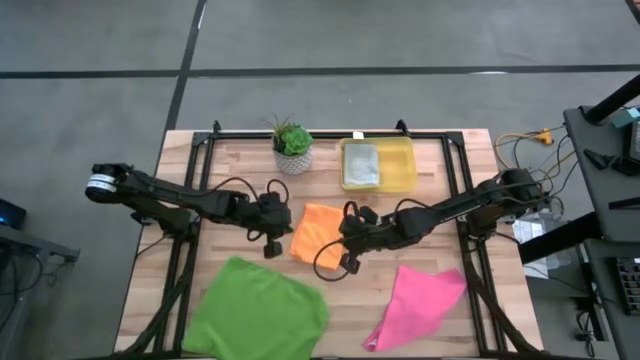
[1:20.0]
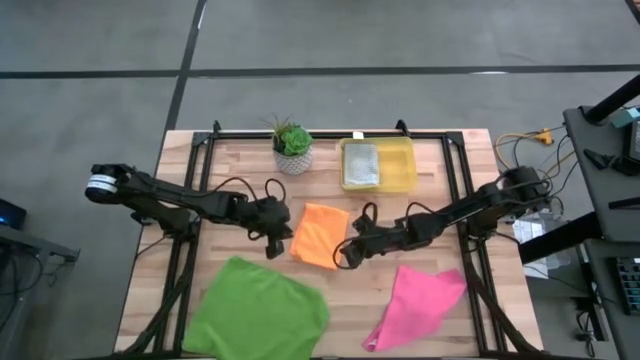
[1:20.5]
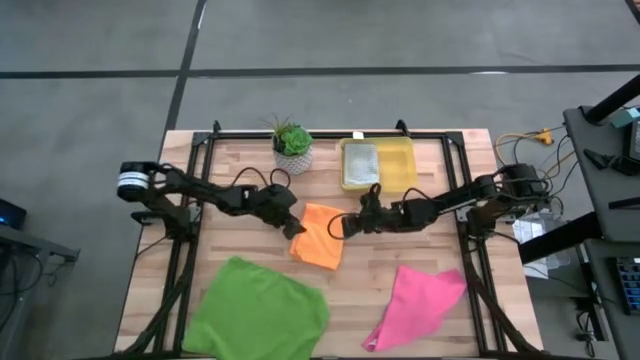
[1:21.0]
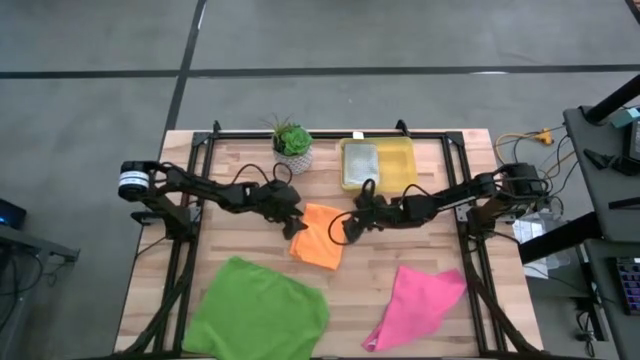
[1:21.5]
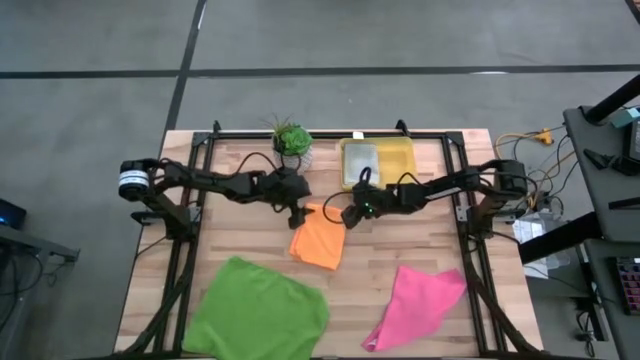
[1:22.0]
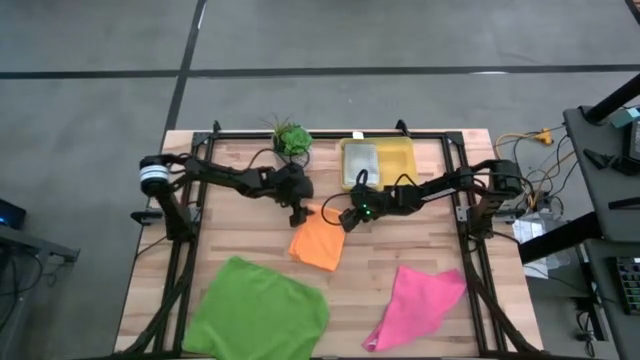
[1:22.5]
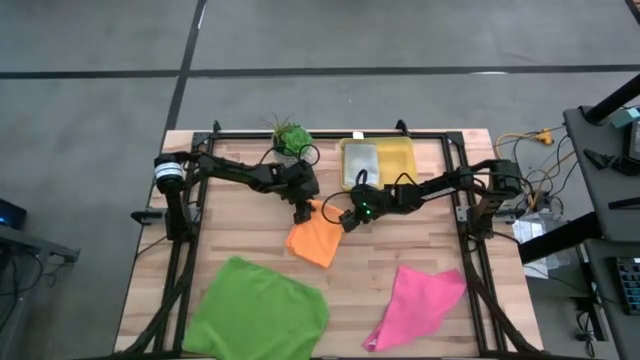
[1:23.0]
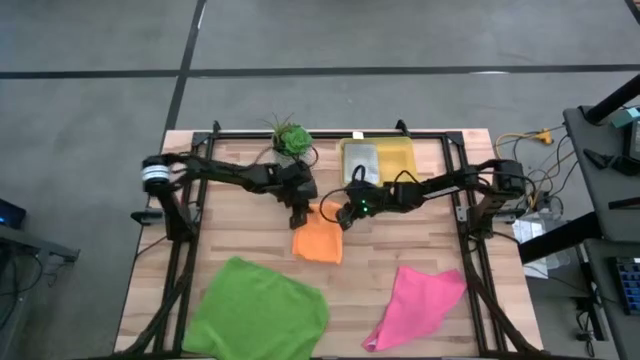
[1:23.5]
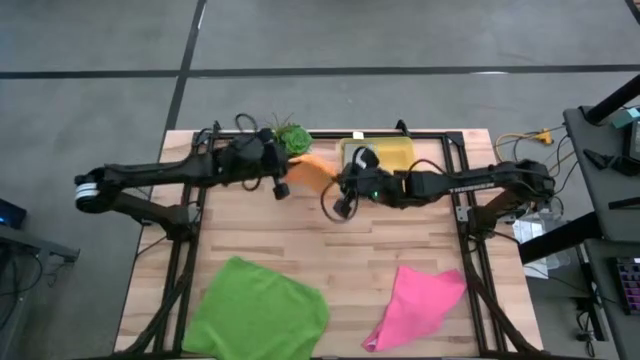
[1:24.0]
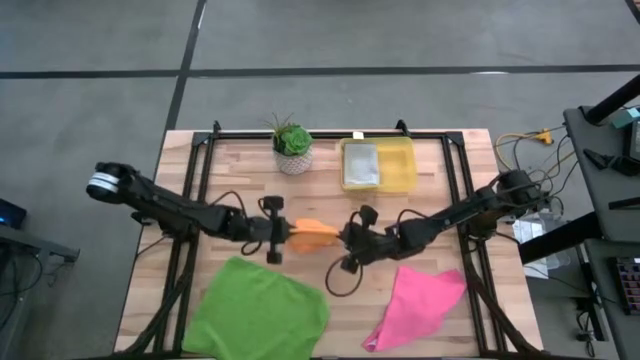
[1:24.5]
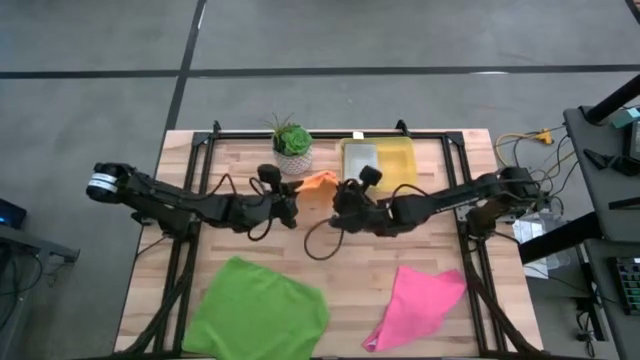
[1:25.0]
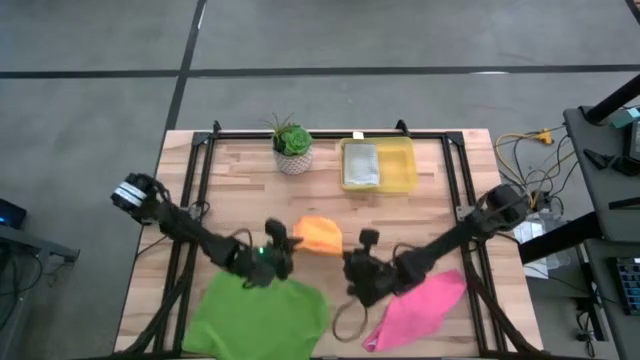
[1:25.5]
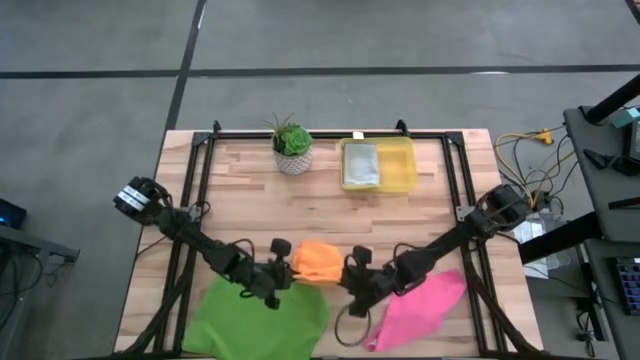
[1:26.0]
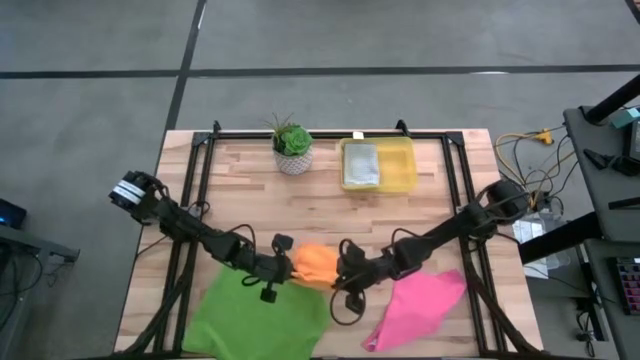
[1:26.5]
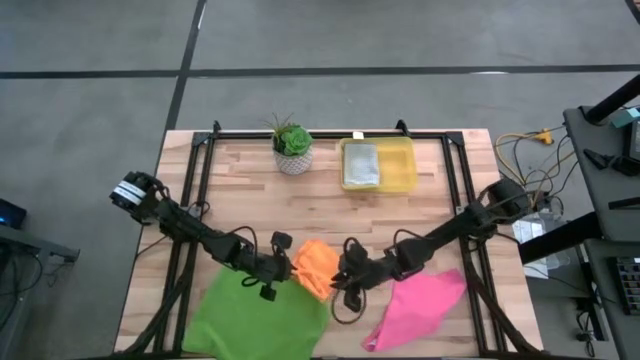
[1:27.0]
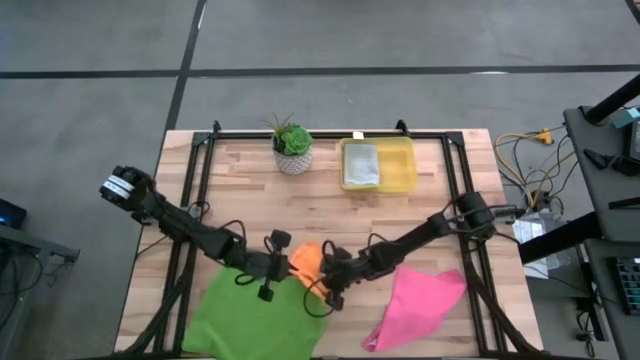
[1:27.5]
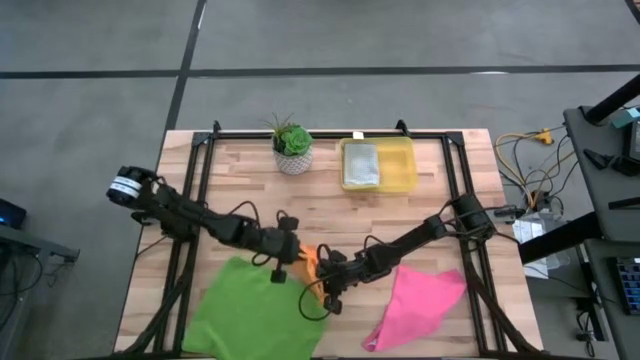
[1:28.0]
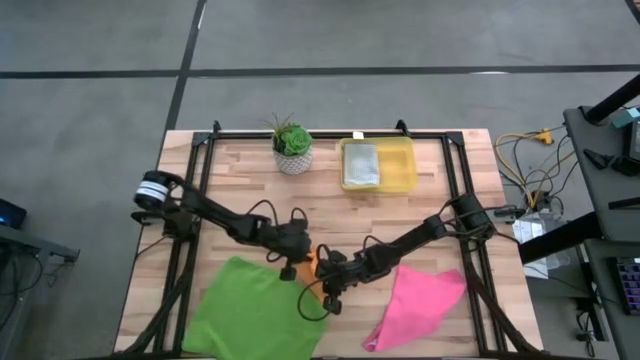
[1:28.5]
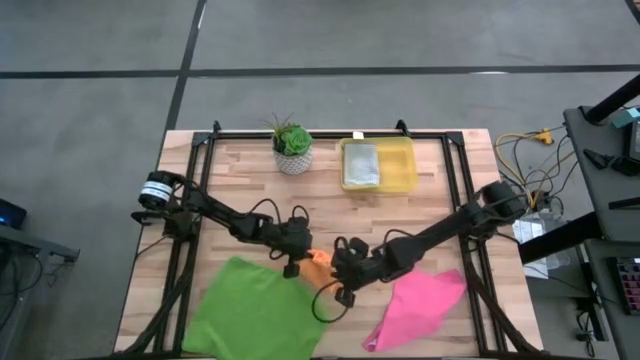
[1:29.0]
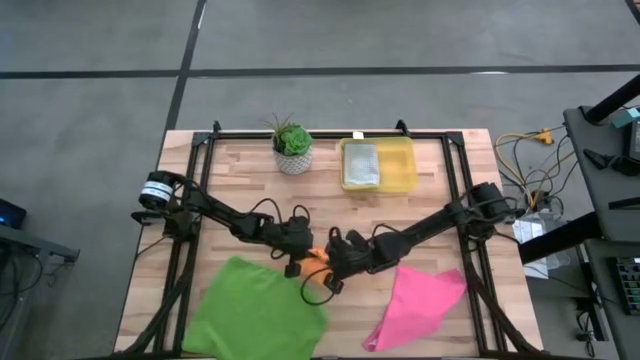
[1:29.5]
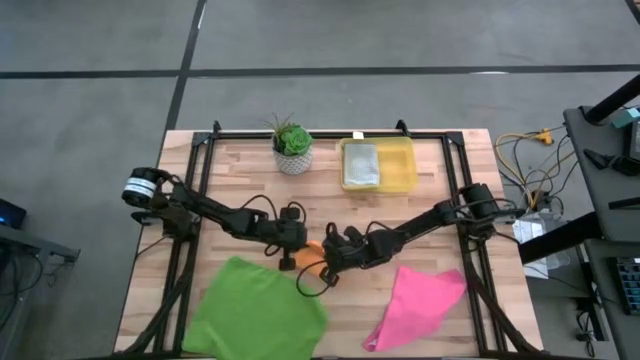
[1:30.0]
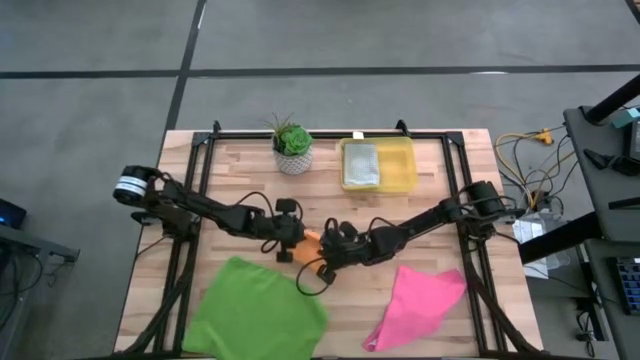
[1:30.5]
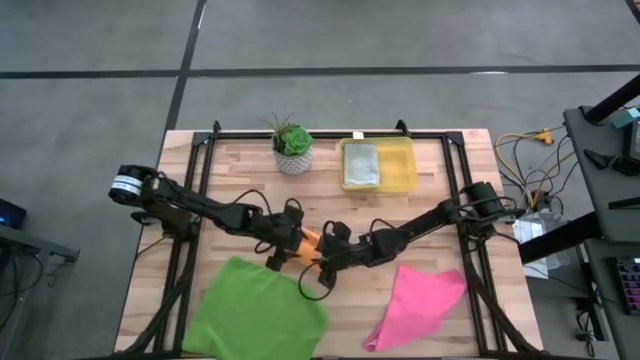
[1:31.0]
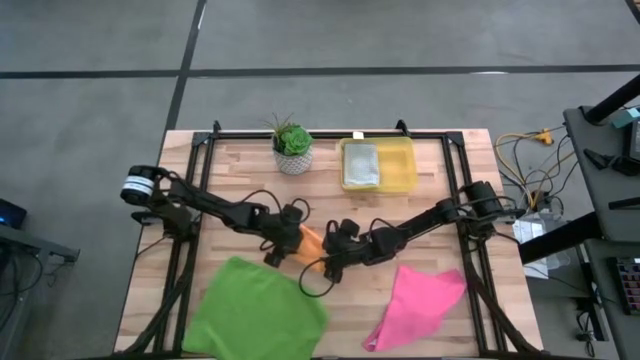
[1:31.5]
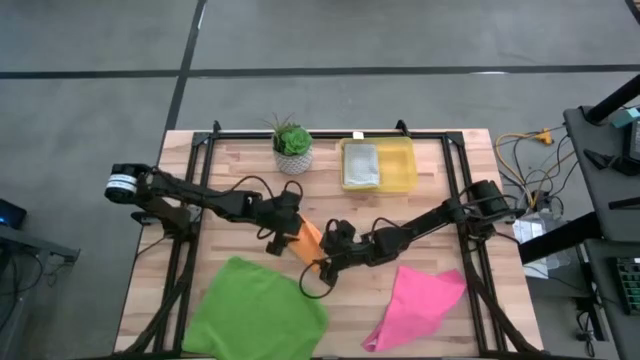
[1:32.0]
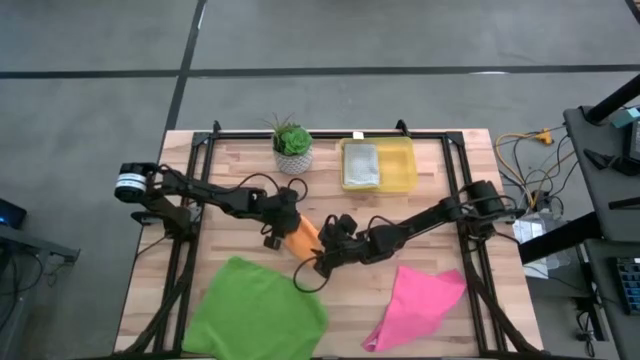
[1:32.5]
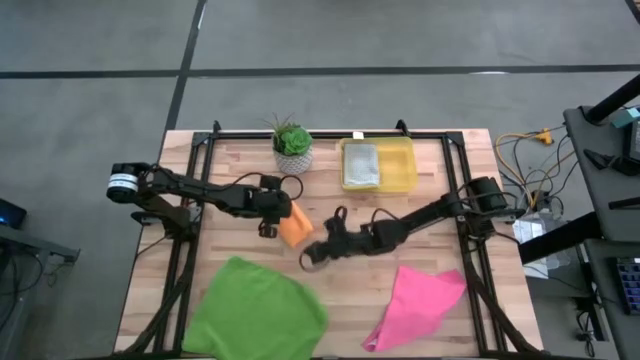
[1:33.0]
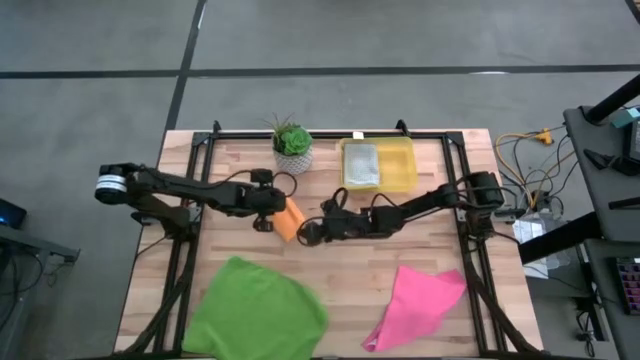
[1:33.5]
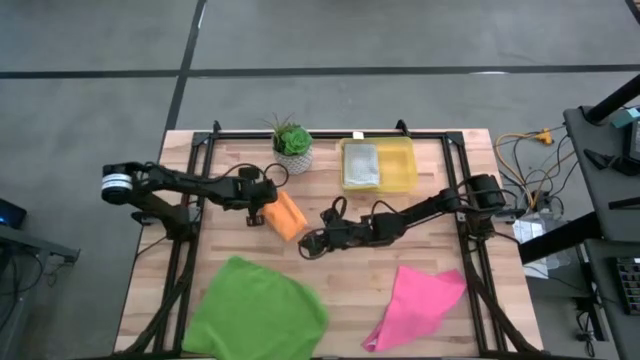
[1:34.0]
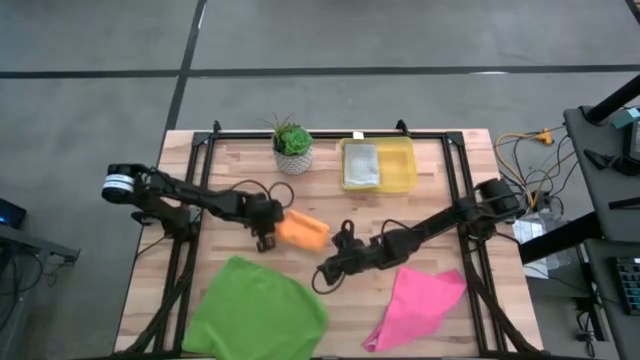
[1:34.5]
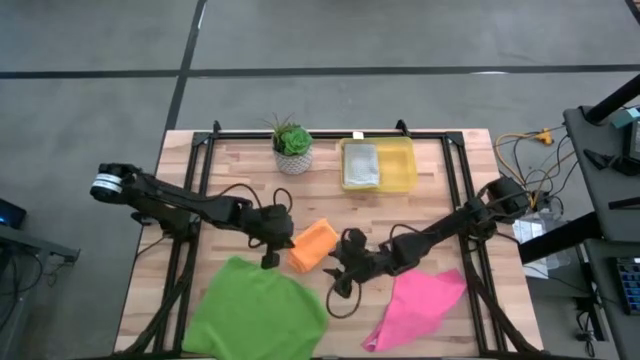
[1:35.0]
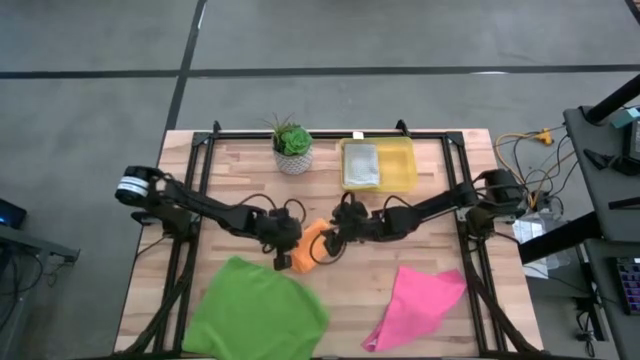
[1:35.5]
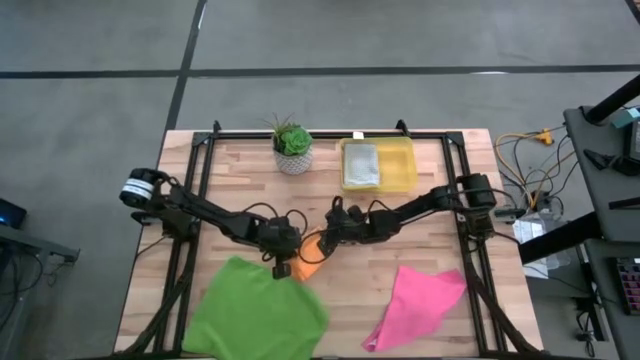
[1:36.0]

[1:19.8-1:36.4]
Task: Fold microfiber towels
Fold the orange microfiber cloth

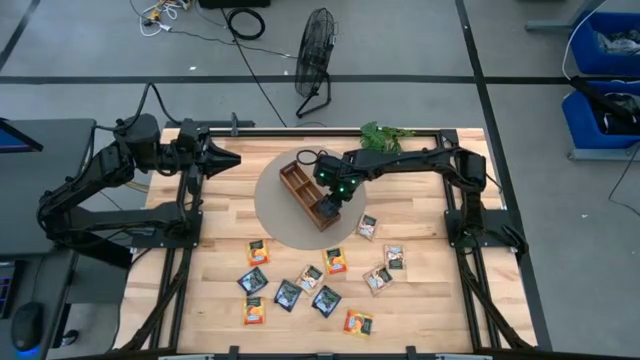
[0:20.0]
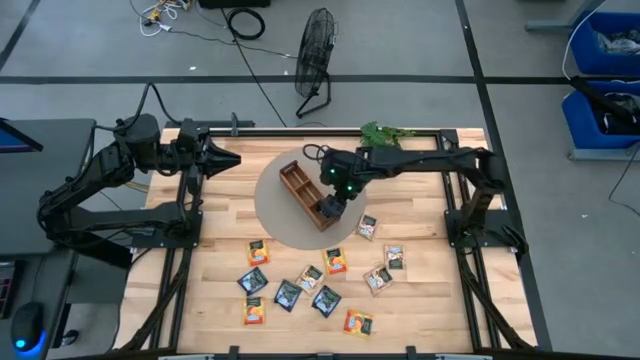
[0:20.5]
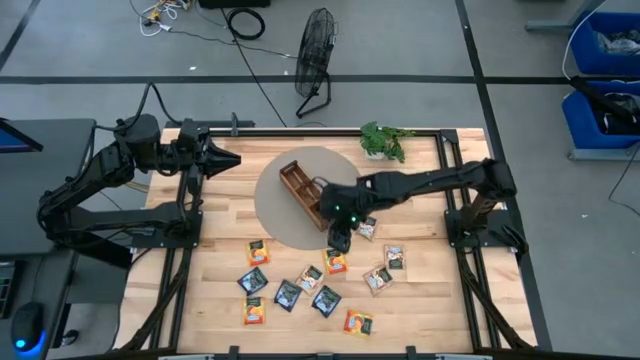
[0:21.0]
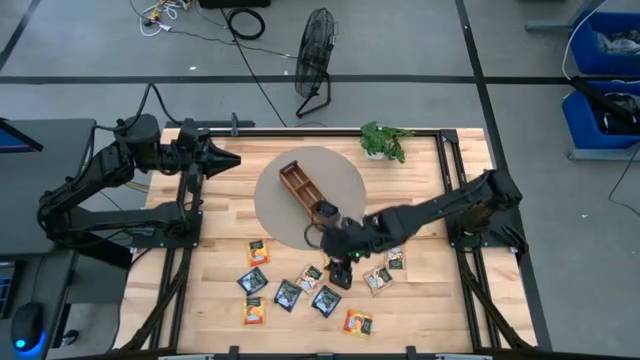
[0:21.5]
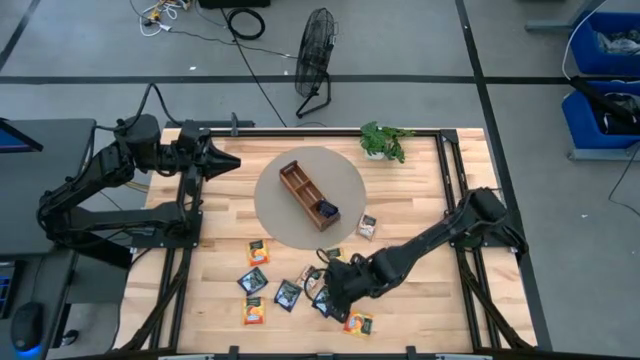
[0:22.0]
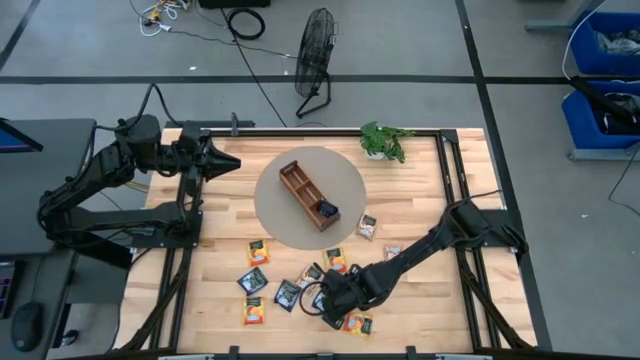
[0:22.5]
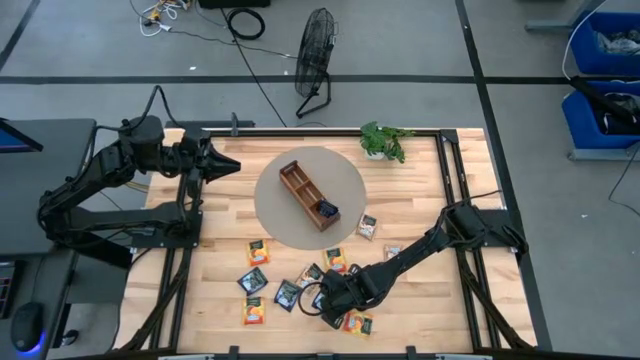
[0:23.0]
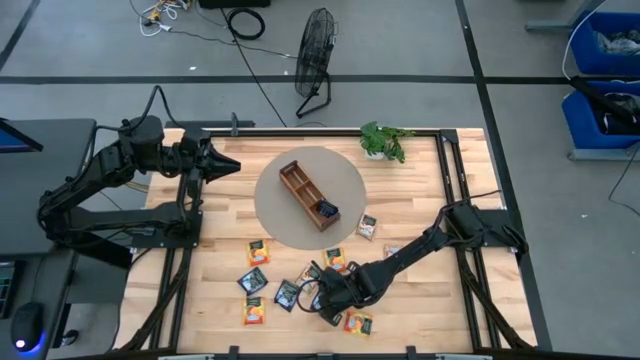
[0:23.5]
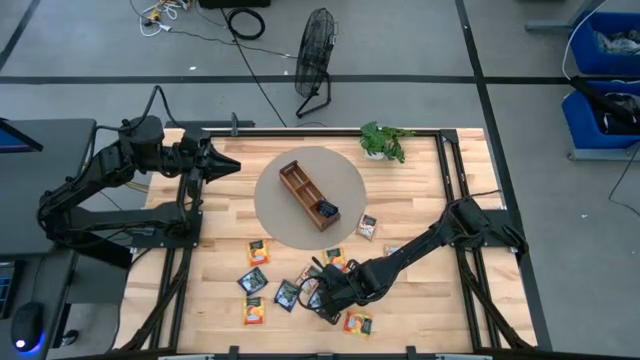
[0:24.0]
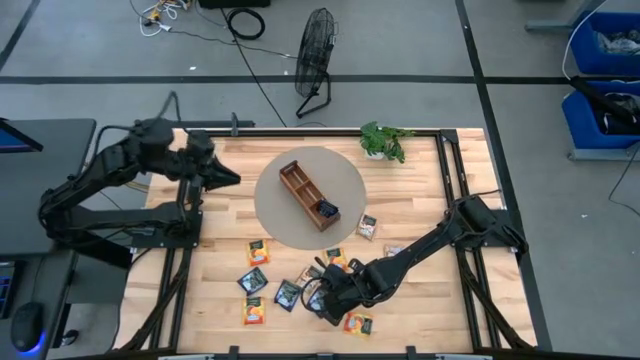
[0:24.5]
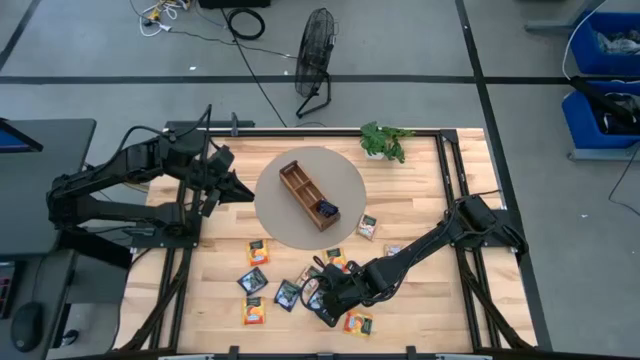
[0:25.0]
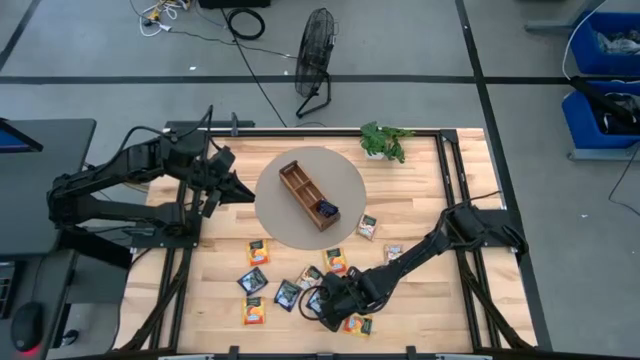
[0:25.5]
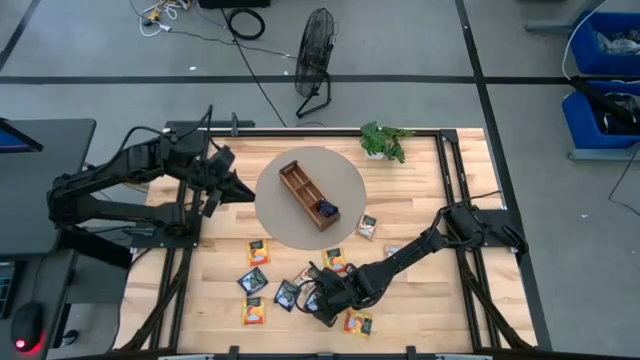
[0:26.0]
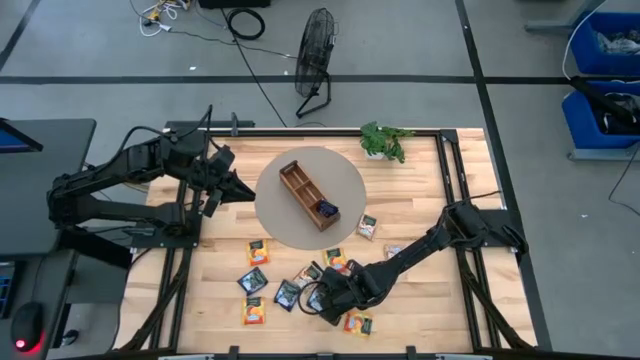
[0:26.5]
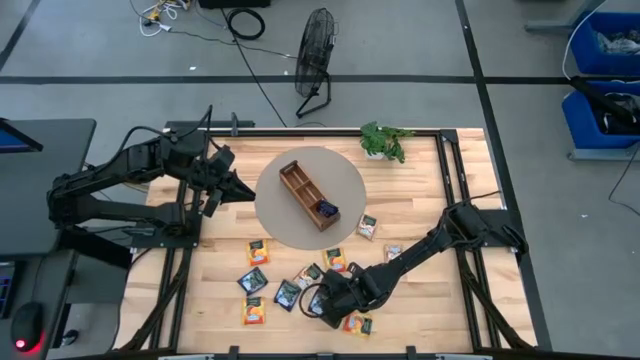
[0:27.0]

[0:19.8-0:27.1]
Task: Pick & Place Tea
Put the purple tea bag into the right section of the wooden organizer
